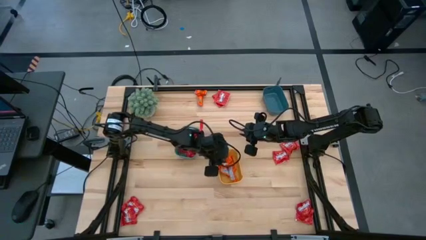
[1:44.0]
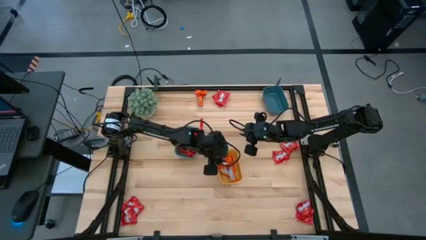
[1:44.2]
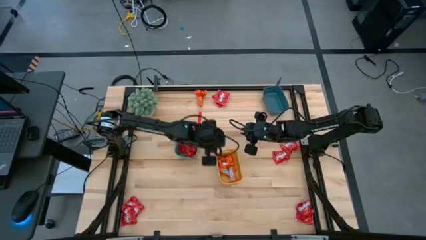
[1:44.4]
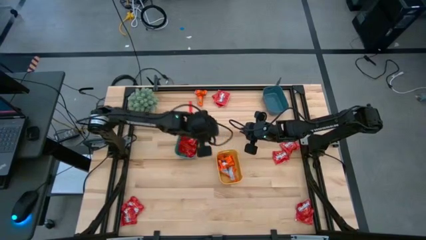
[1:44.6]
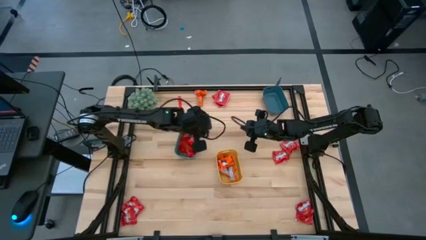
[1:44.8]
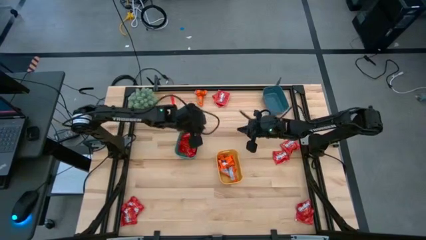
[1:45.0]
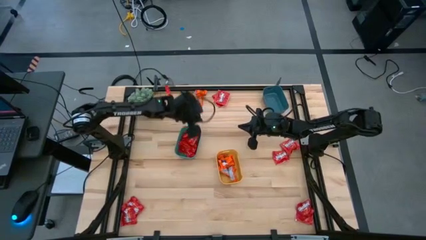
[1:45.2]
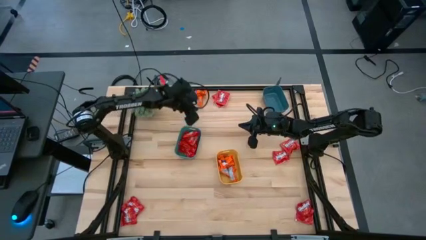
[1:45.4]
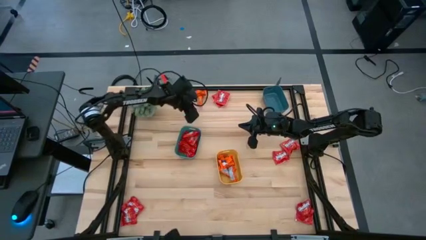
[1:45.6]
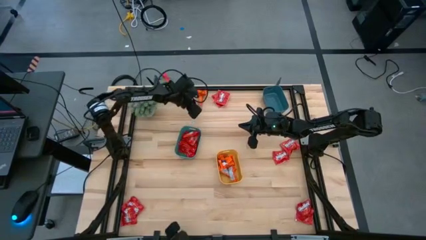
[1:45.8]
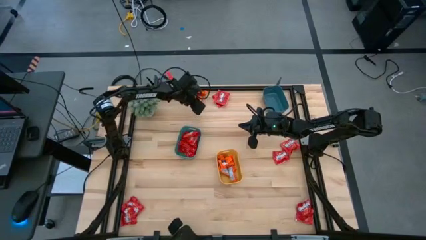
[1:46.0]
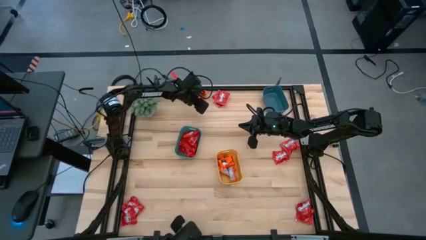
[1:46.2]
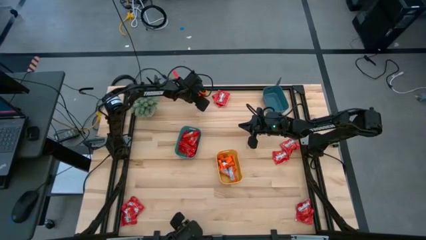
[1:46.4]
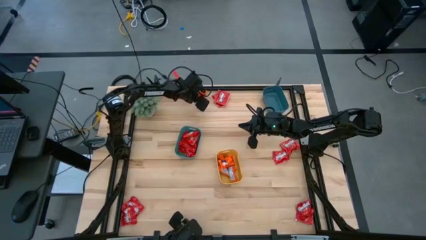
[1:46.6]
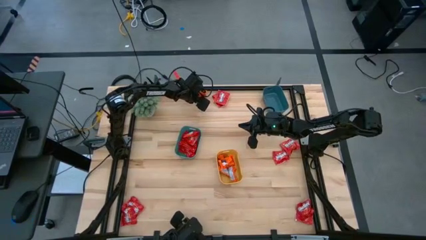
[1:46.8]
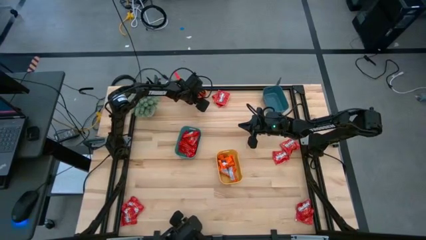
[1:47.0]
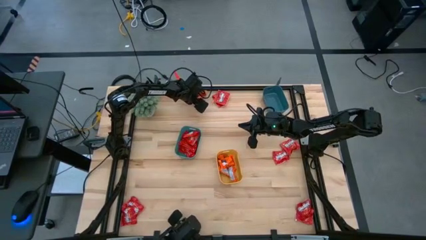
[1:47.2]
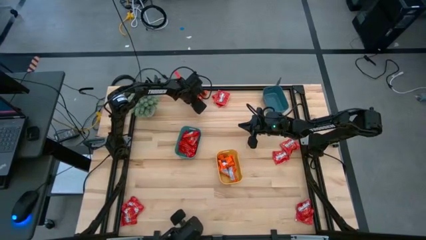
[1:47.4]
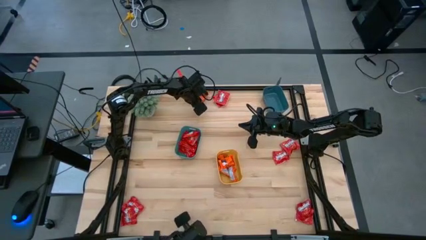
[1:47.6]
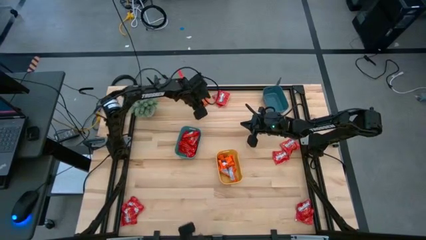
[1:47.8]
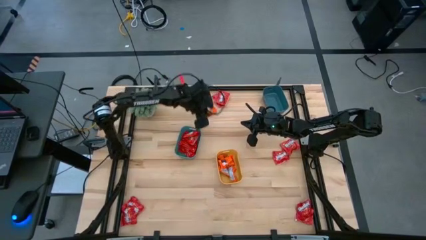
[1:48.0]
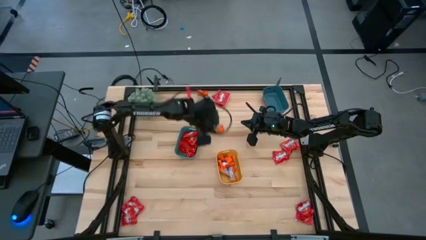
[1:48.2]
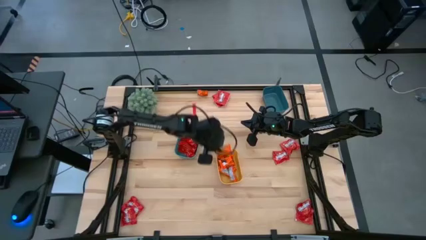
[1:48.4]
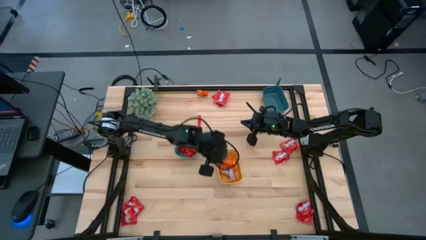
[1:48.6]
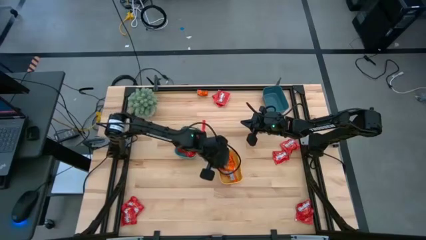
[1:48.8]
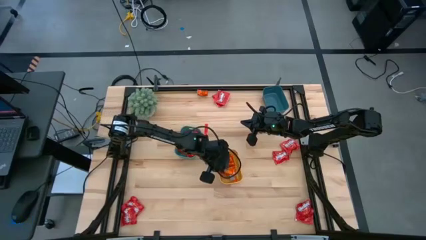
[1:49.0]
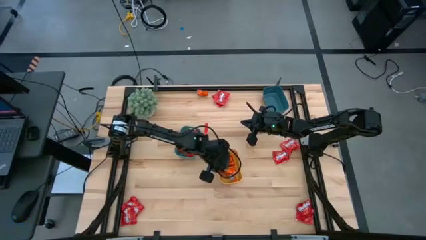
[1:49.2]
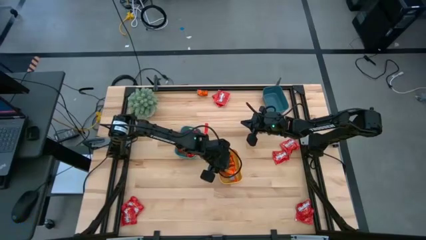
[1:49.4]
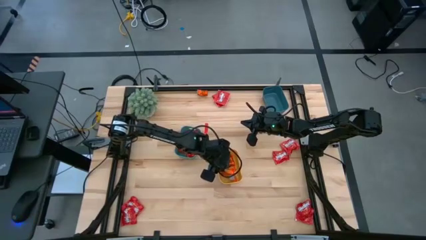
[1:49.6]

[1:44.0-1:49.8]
Task: Sort candy
Put the orange candy into the yellow bin

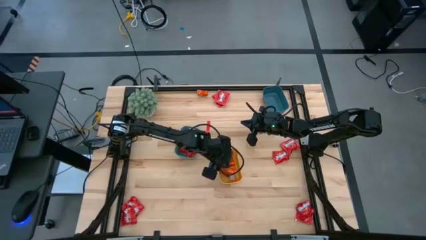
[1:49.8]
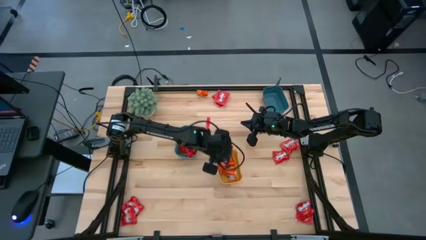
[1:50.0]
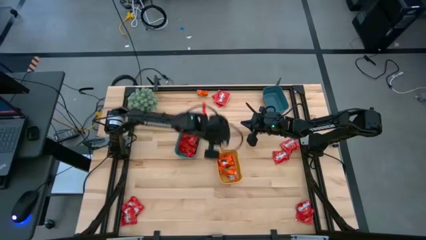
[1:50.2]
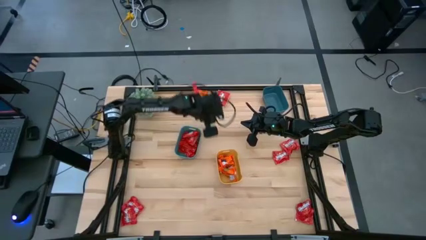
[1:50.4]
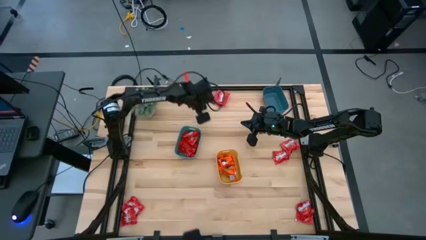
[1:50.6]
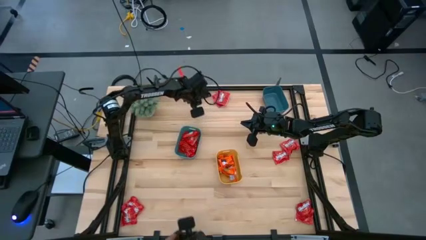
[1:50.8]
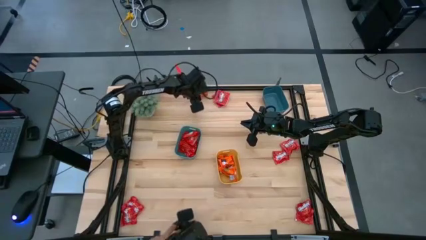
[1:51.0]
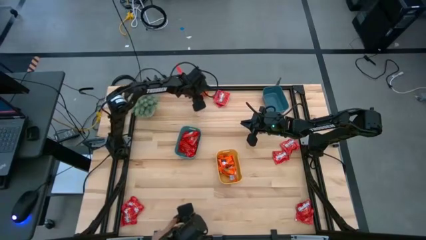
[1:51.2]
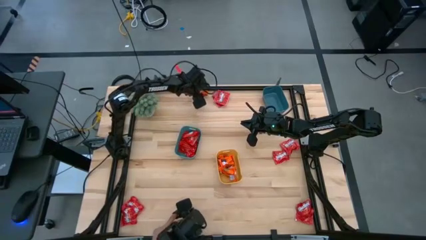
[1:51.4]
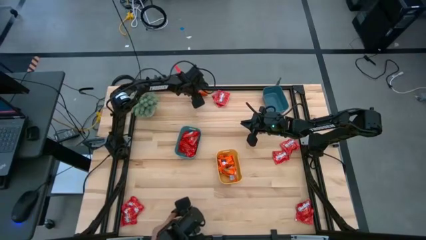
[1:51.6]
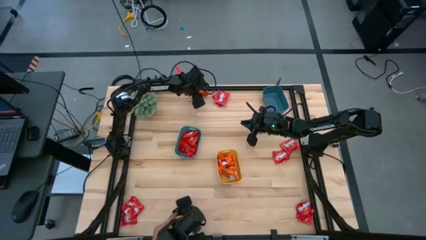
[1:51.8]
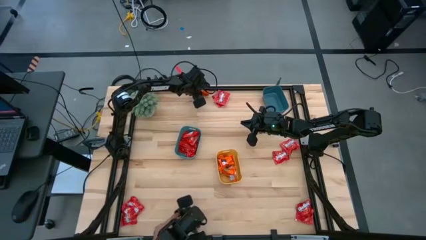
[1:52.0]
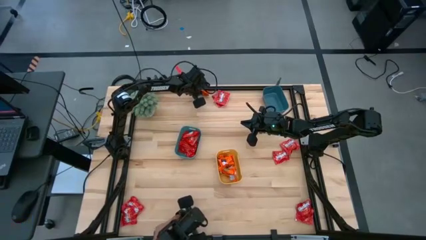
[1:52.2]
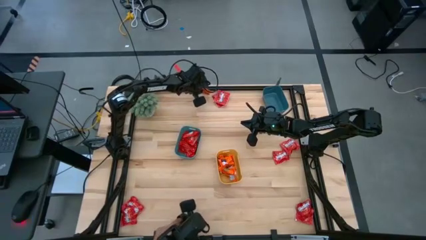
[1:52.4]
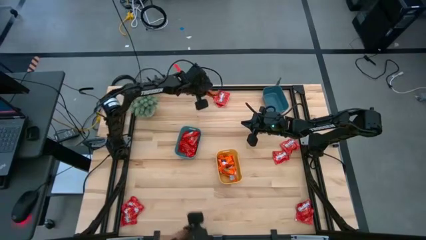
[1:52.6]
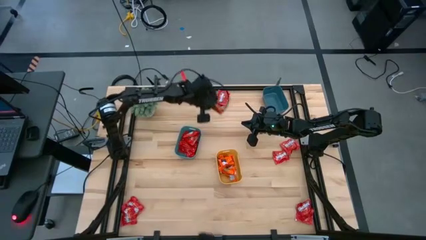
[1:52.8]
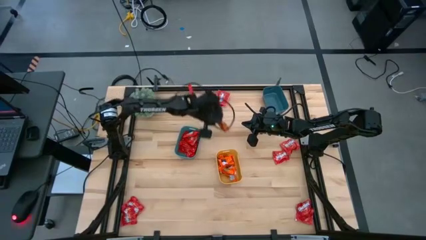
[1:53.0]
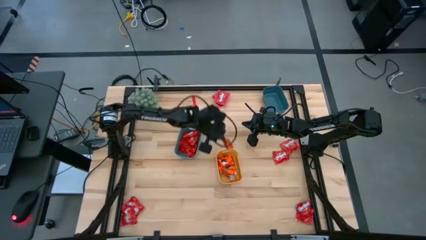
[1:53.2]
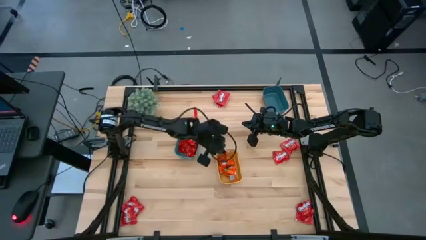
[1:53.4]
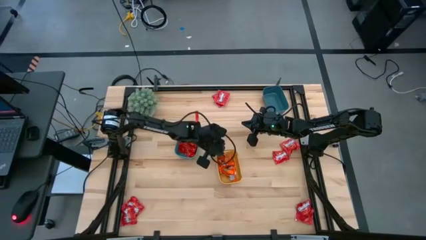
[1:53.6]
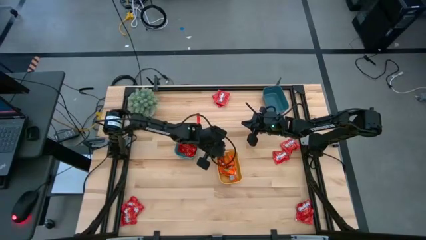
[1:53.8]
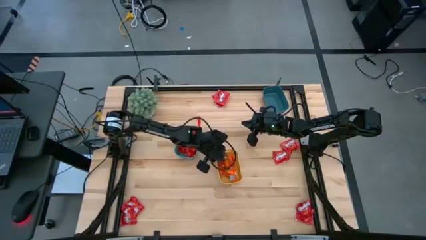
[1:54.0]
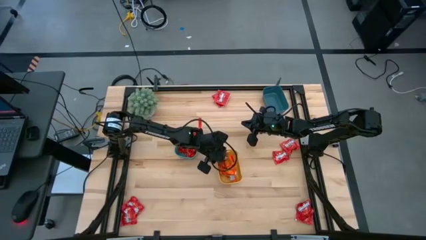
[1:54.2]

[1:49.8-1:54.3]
Put the orange candy into the yellow bin

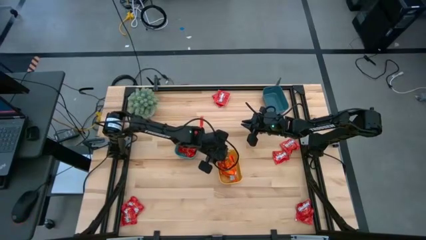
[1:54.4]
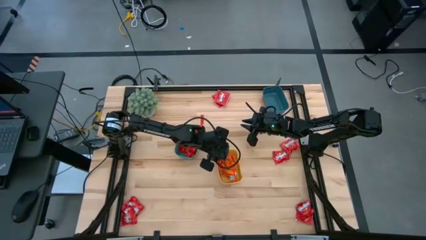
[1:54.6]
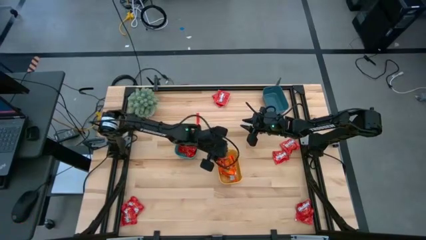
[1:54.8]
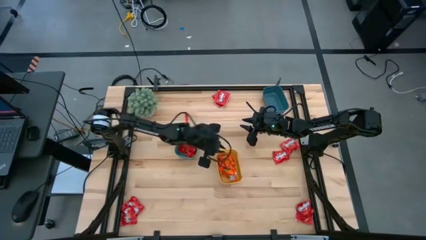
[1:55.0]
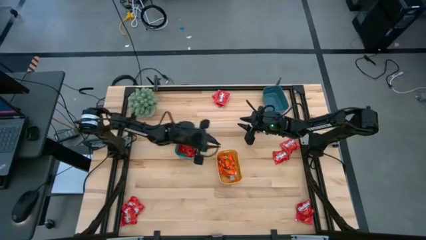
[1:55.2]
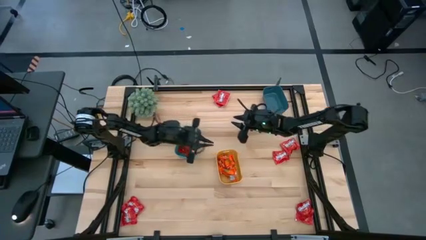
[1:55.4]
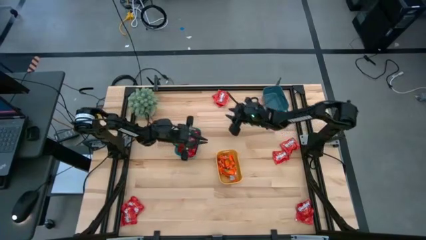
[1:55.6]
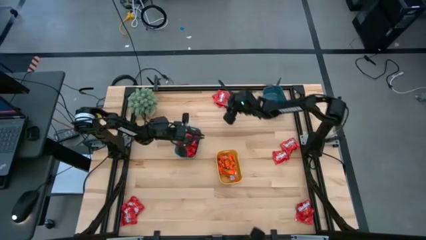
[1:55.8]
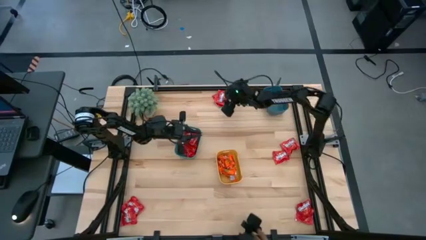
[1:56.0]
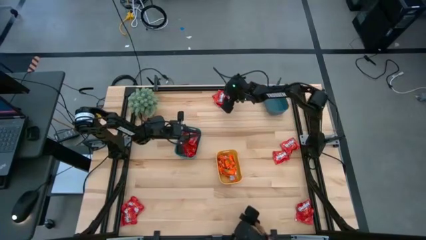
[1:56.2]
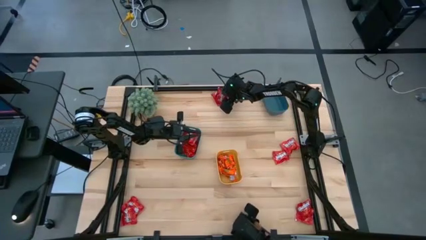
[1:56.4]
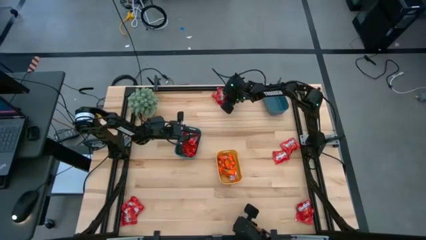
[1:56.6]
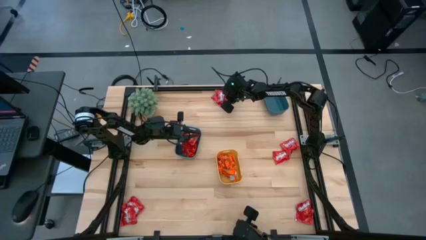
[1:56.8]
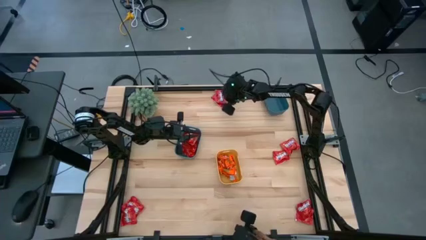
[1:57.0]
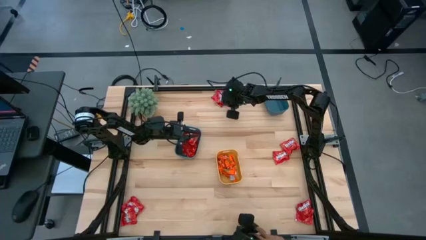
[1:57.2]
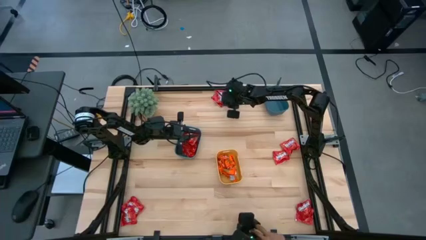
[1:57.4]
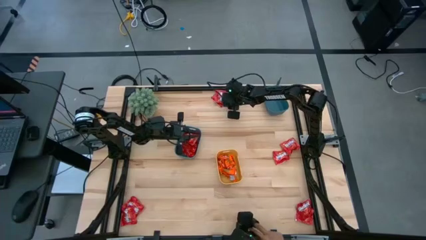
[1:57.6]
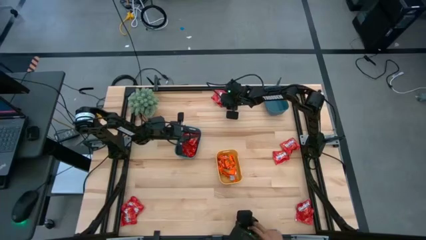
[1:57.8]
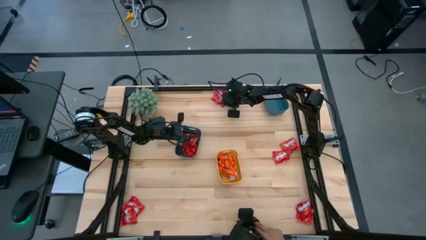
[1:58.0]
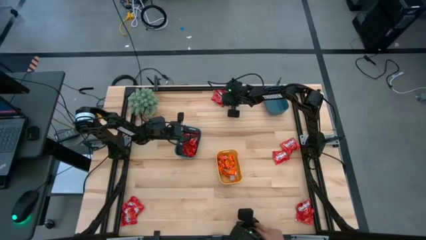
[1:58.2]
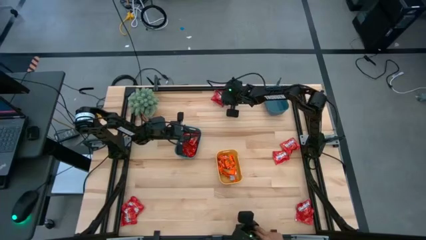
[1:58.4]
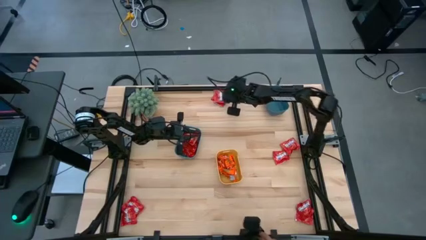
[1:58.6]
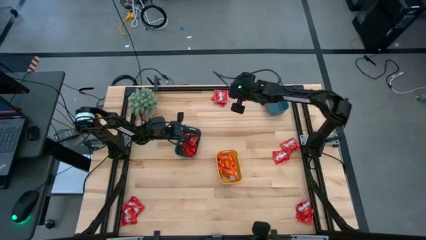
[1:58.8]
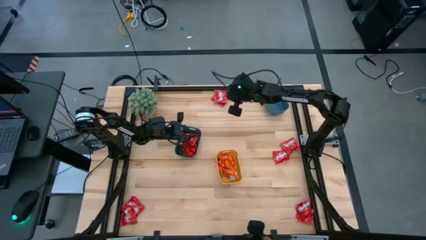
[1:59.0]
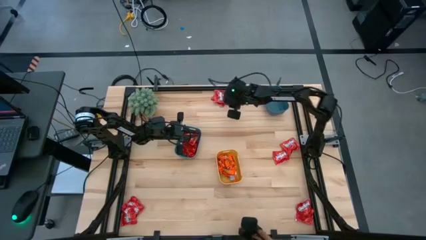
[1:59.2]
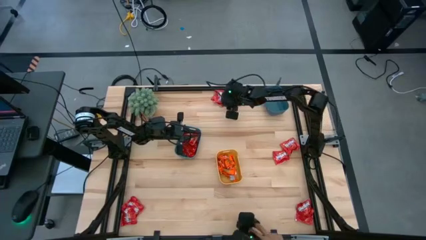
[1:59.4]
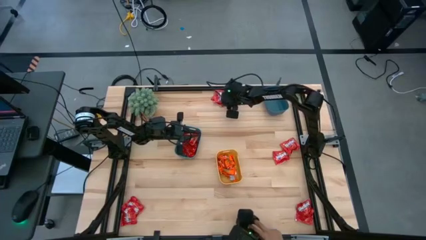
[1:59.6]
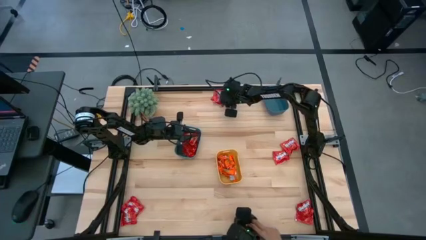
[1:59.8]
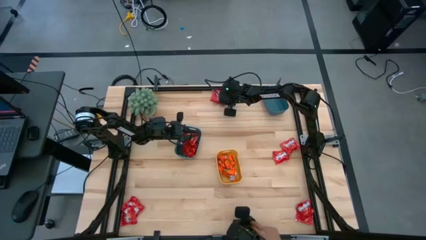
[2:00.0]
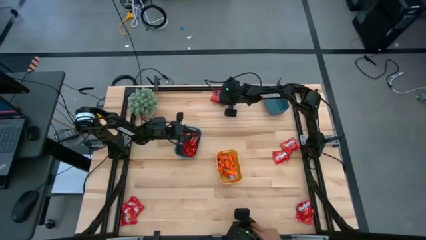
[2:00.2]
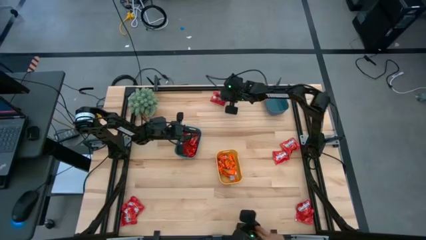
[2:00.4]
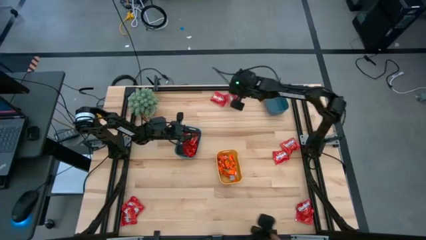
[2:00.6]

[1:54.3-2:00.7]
Put the orange candy into the yellow bin
